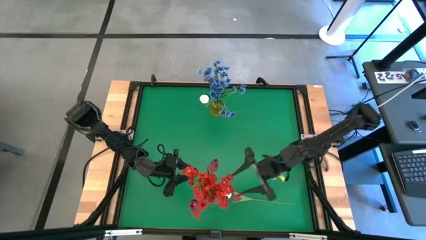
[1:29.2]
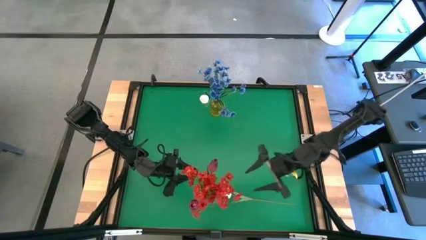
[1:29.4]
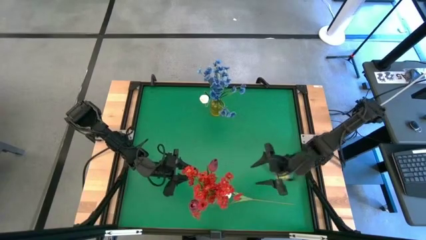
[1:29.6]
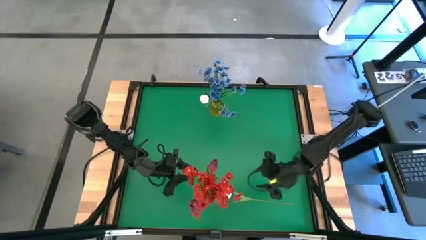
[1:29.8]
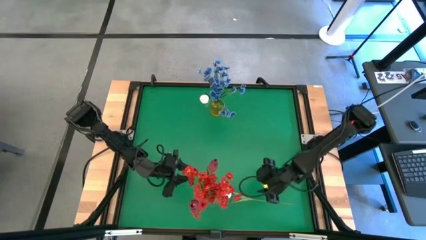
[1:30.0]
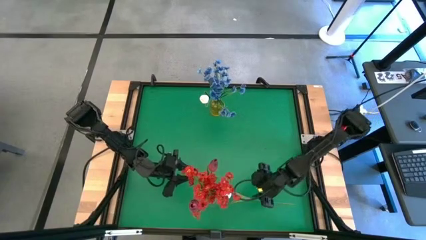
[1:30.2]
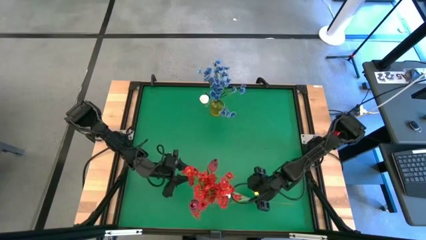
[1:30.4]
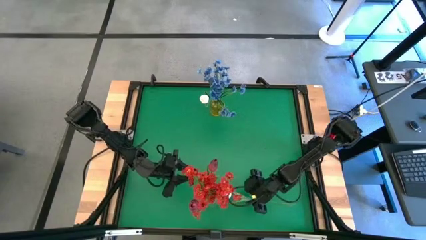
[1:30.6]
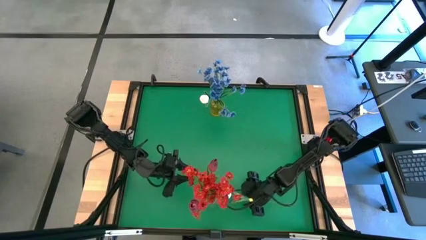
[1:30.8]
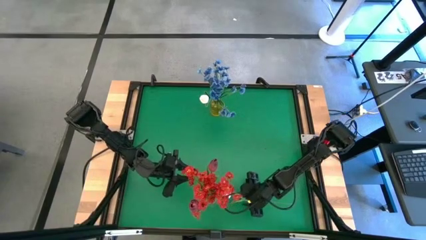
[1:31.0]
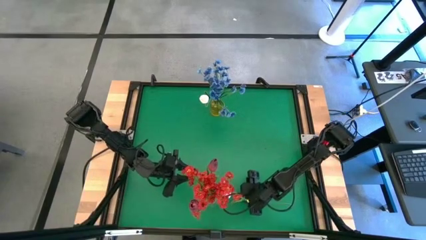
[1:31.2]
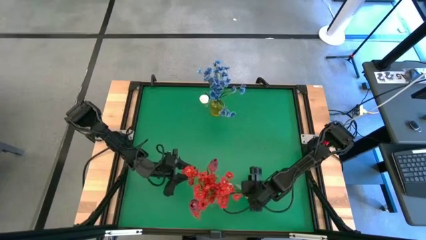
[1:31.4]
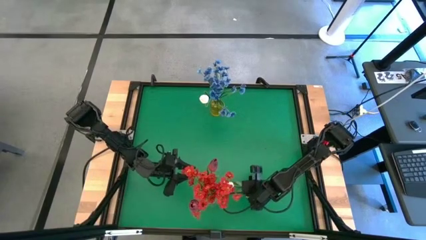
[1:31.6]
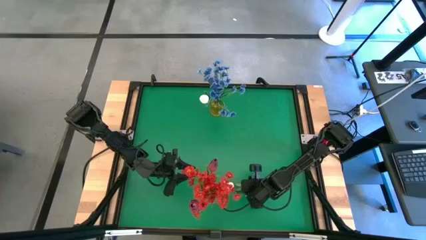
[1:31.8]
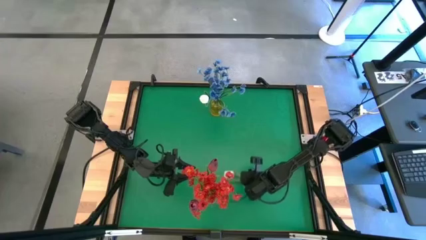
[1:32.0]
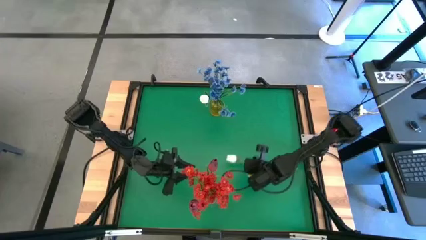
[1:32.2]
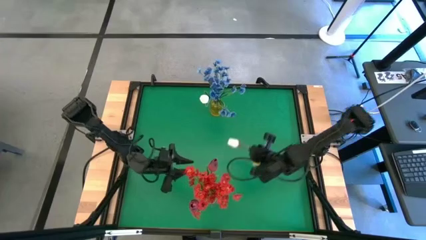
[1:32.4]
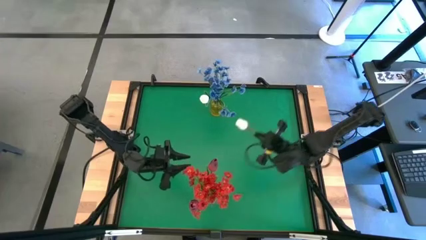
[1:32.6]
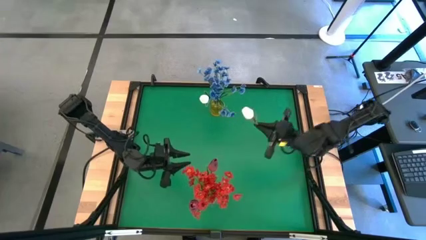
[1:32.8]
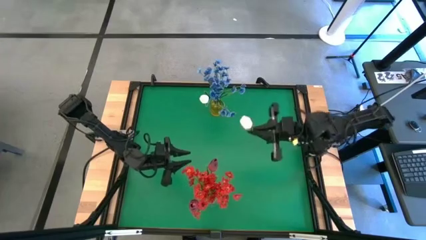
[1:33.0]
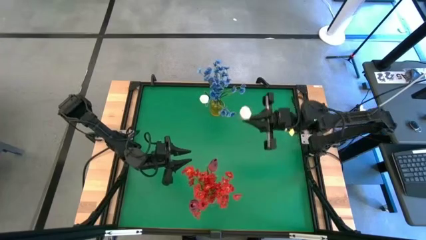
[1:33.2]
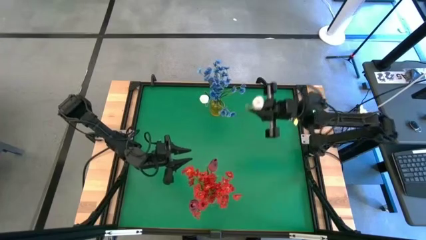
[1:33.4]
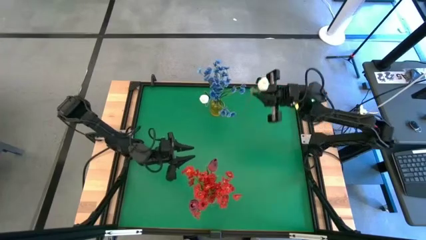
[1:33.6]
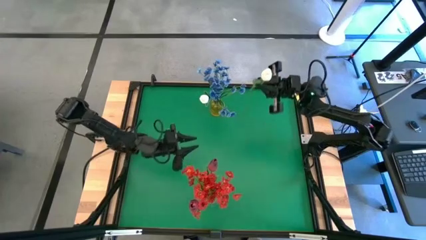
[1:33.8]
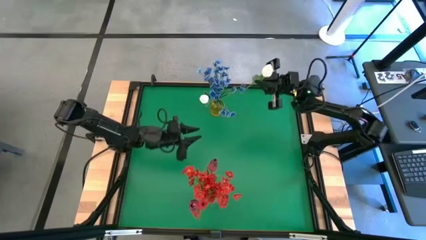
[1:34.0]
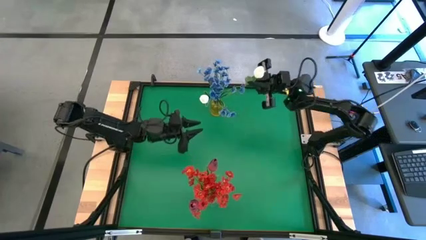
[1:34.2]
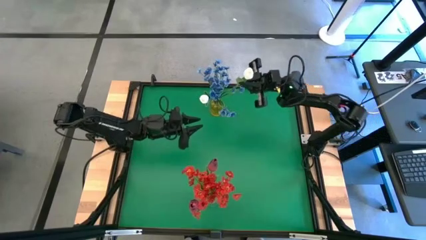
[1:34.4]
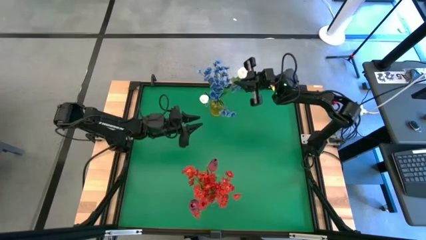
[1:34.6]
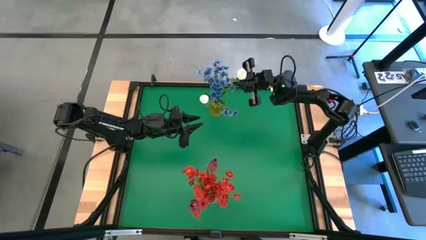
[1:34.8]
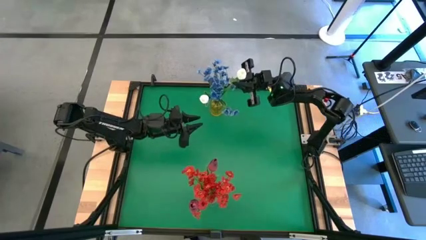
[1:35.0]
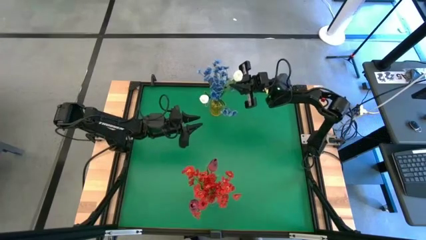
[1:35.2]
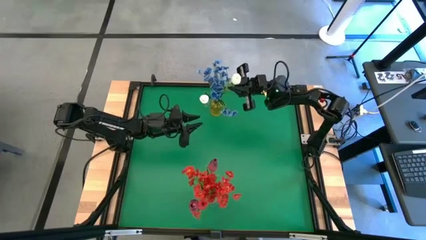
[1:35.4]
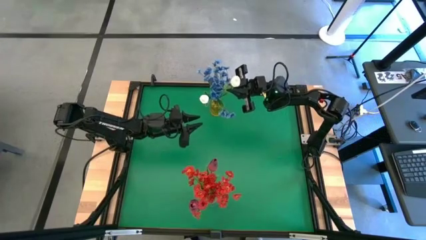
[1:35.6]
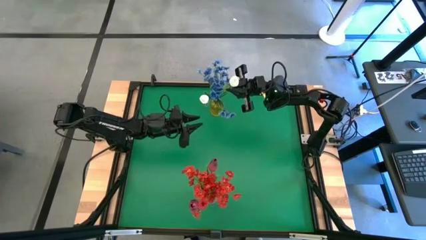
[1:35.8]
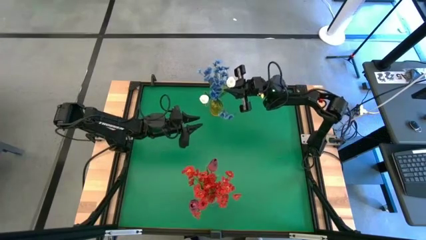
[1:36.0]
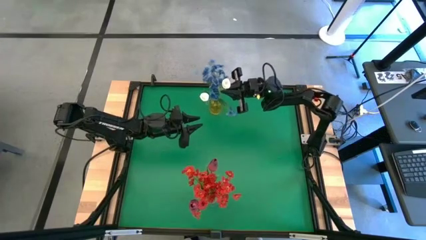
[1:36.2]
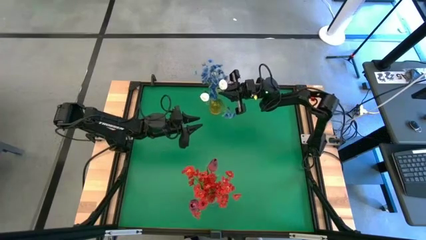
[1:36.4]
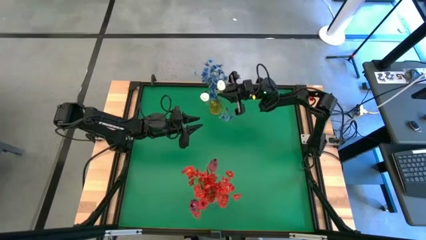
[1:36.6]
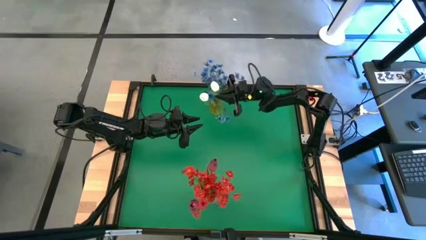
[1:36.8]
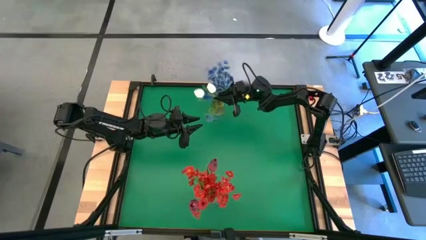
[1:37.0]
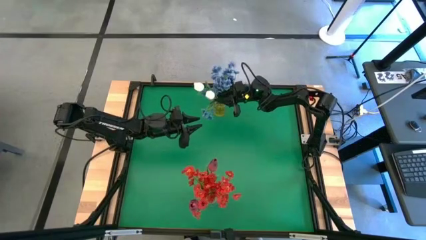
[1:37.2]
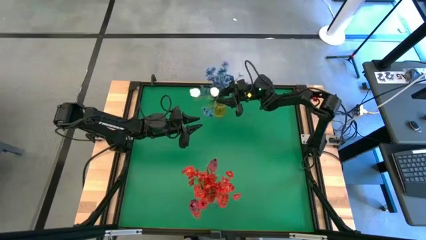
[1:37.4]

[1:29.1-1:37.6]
Task: Sort flowers into vase by color
Put the white flower into the yellow vase

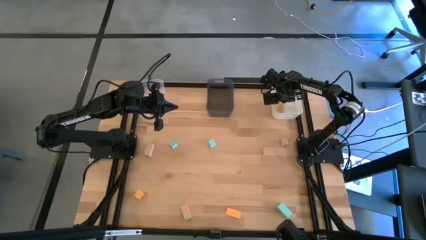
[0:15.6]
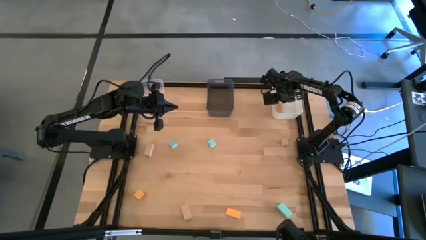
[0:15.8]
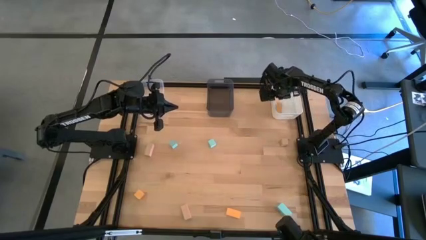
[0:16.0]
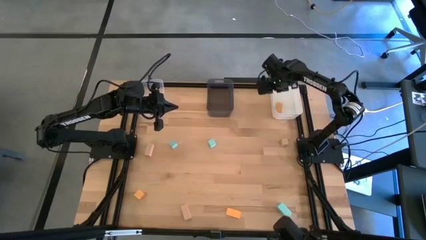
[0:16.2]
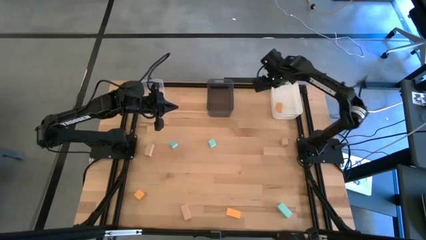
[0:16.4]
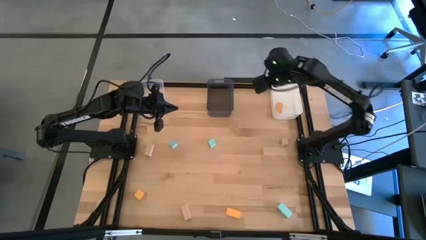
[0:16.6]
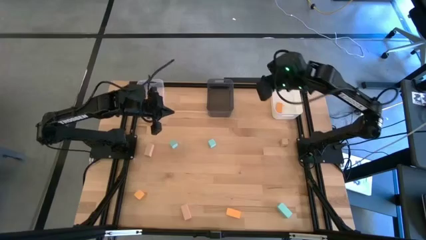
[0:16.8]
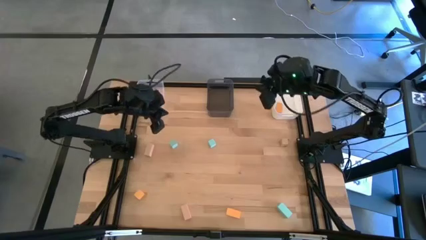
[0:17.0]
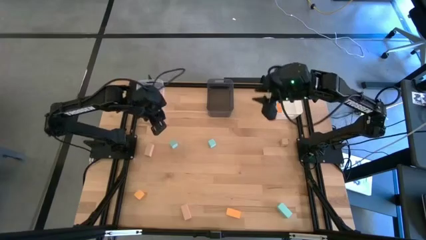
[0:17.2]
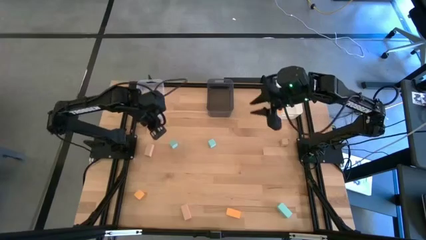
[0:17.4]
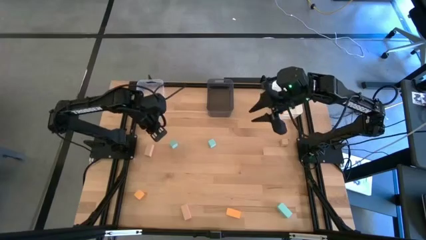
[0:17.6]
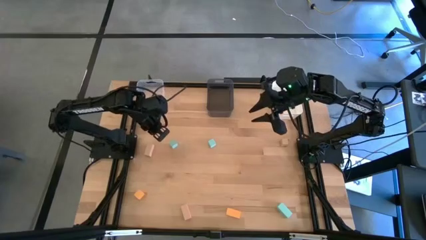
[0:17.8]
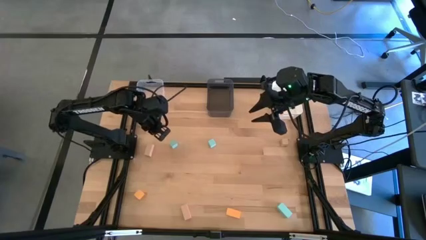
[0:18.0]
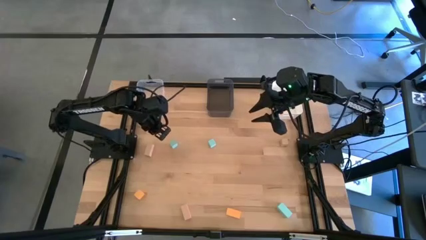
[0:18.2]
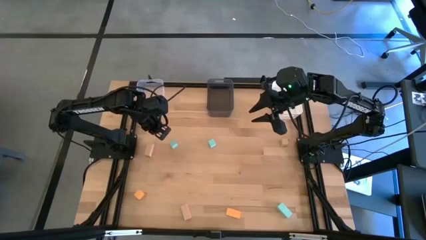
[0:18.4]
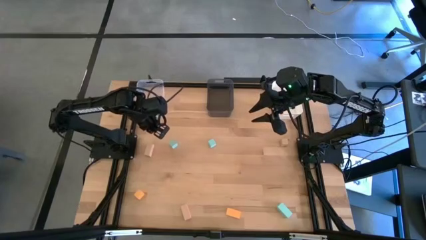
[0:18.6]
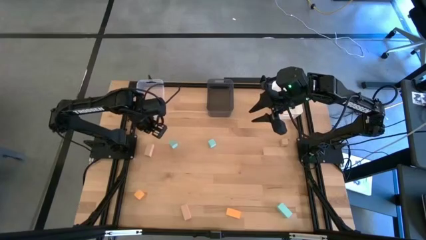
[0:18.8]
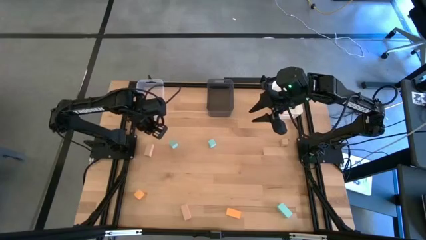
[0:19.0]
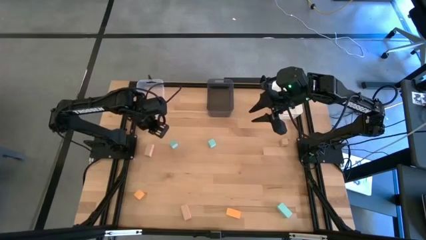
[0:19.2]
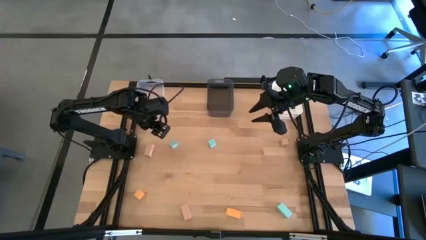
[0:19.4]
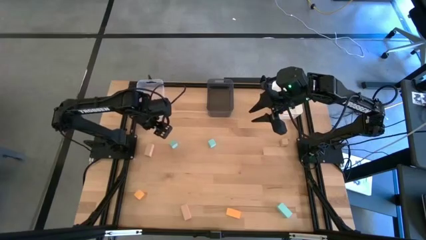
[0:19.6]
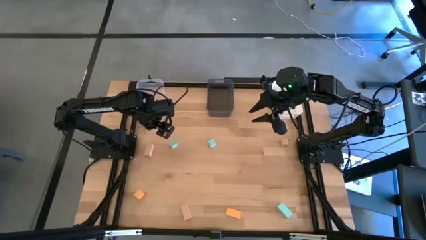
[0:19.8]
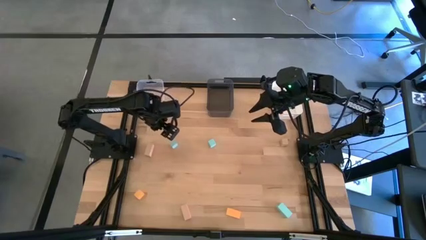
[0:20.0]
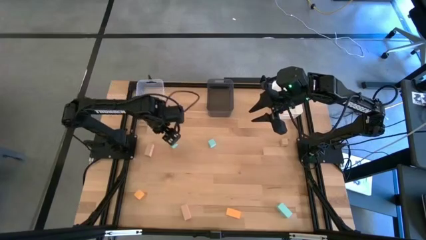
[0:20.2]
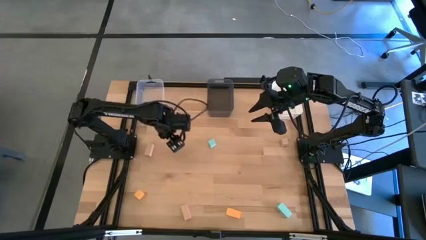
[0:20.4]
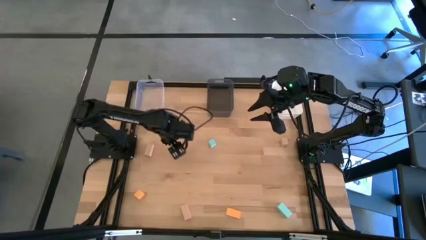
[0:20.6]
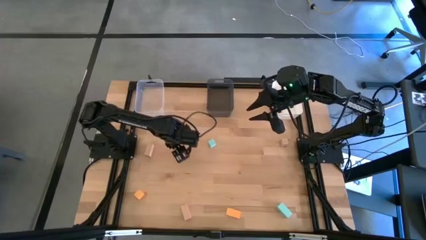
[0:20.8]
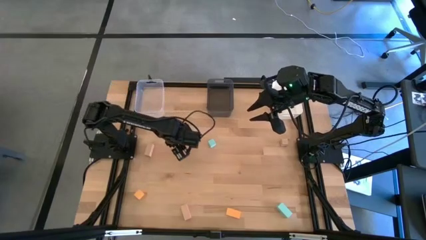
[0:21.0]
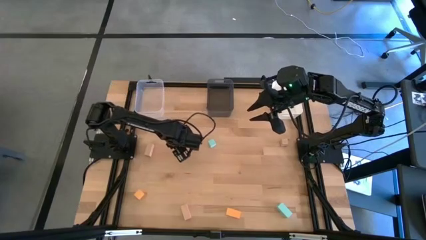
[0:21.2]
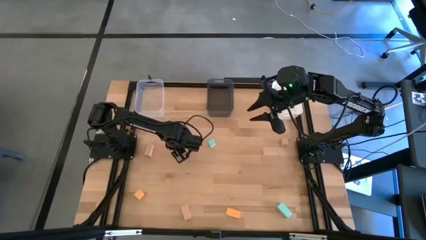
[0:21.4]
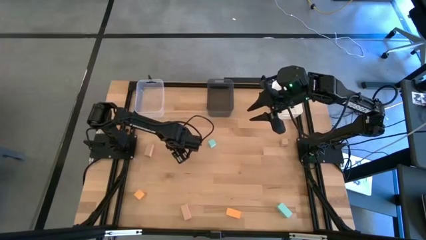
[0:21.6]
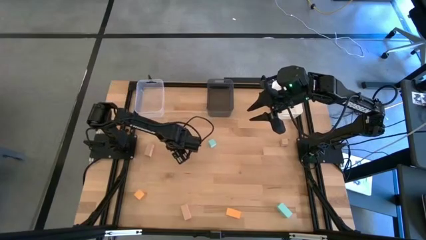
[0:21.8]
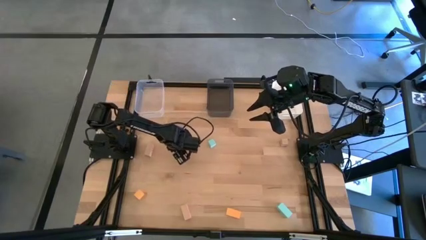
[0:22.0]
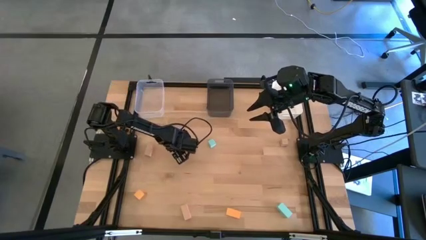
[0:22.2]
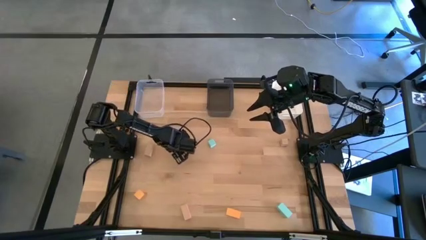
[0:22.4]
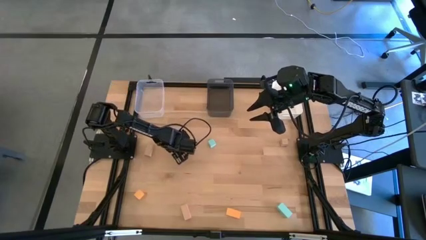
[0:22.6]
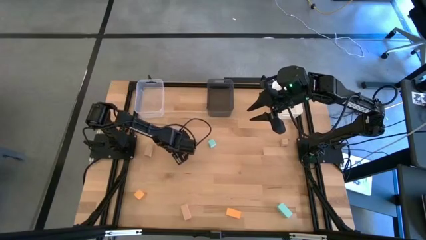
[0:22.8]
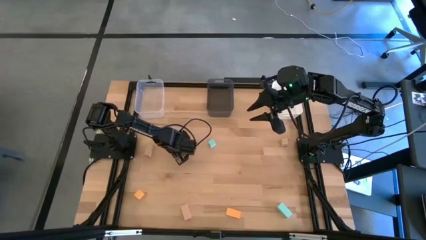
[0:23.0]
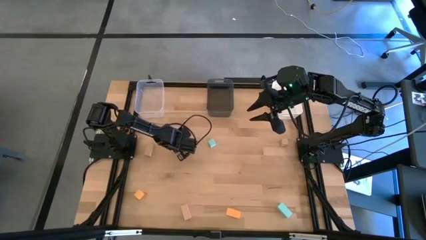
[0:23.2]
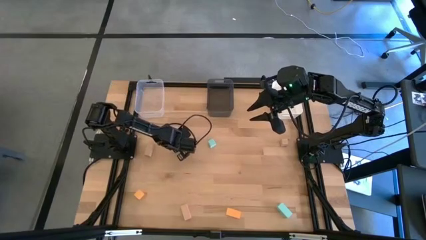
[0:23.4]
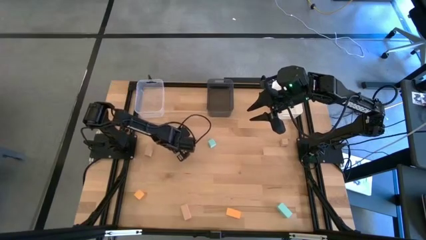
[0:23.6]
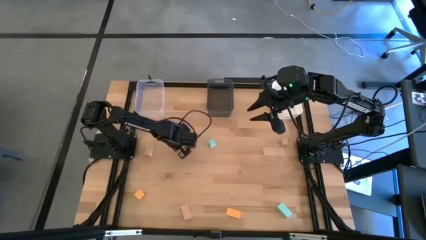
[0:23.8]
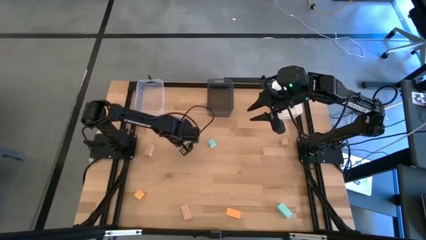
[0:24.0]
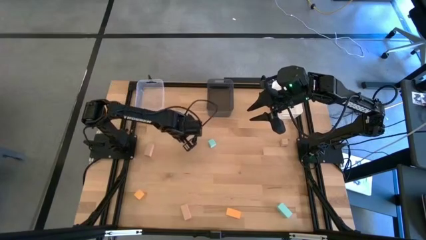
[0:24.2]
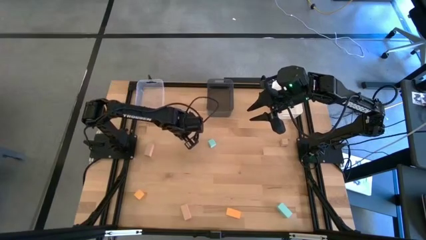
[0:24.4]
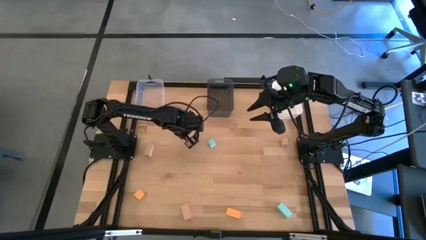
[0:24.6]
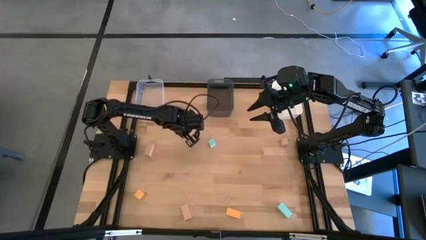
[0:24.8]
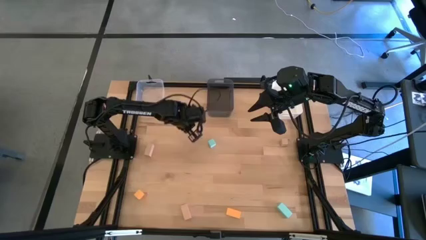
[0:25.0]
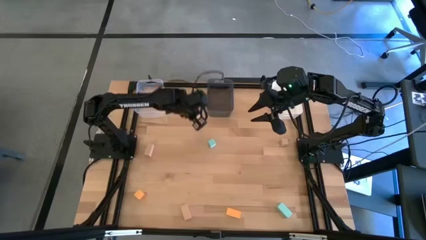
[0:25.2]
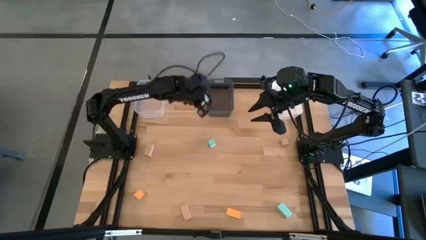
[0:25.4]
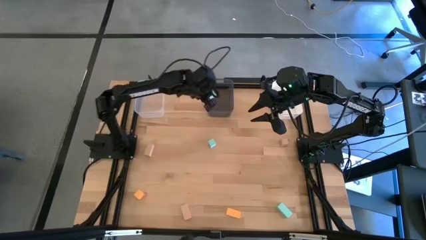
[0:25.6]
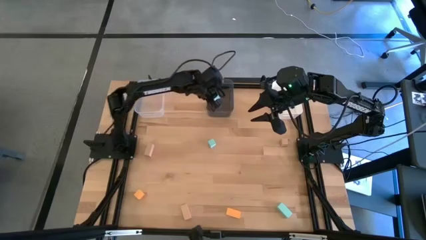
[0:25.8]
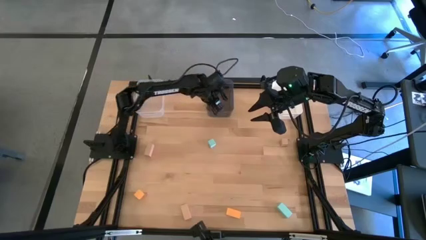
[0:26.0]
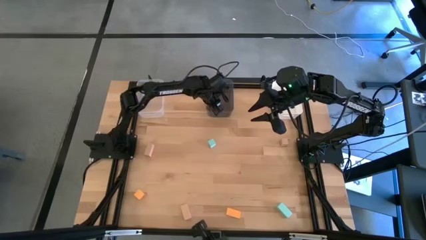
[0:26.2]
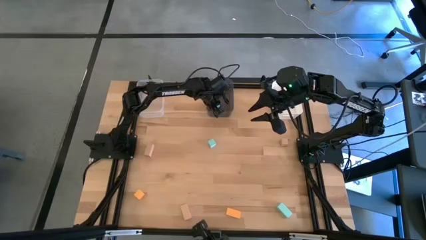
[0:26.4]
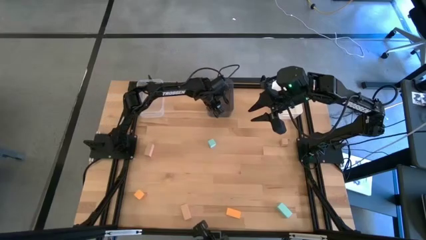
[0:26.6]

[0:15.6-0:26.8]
Task: Sort & place blocks by color
Put the top left blue block into the black bin
